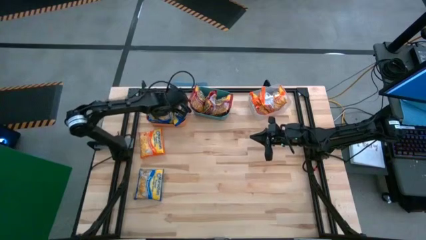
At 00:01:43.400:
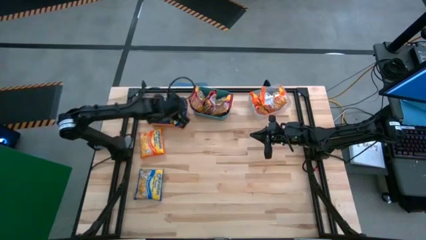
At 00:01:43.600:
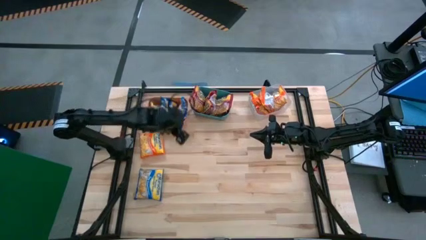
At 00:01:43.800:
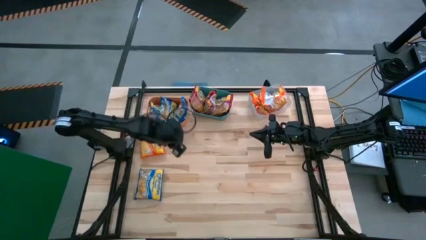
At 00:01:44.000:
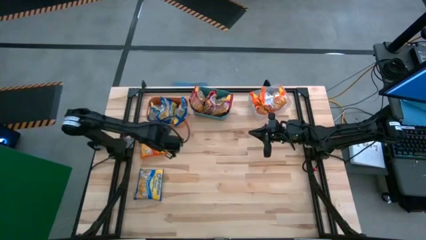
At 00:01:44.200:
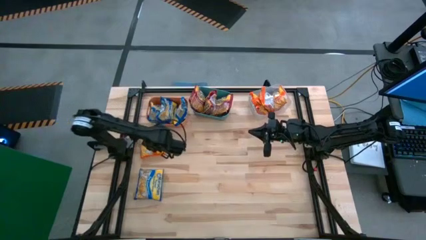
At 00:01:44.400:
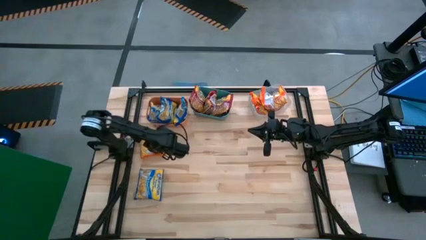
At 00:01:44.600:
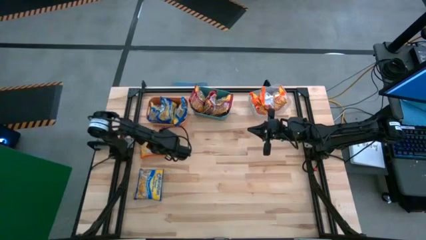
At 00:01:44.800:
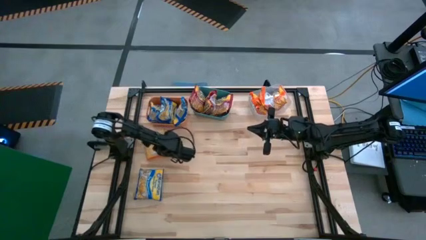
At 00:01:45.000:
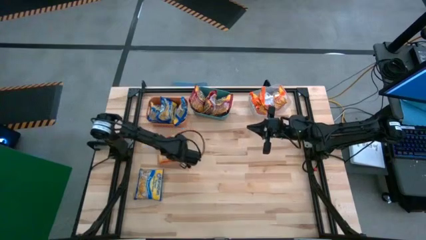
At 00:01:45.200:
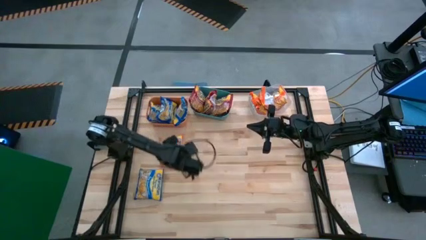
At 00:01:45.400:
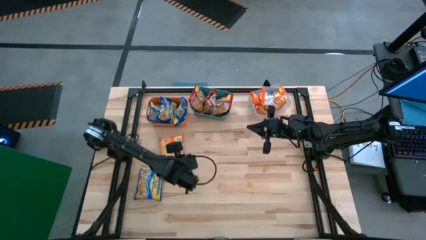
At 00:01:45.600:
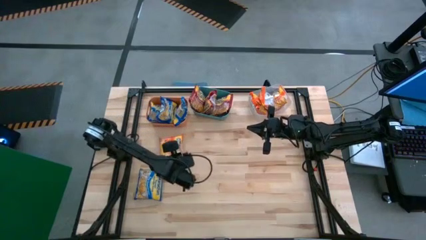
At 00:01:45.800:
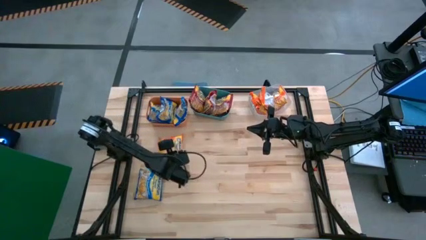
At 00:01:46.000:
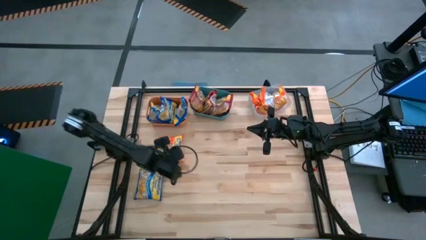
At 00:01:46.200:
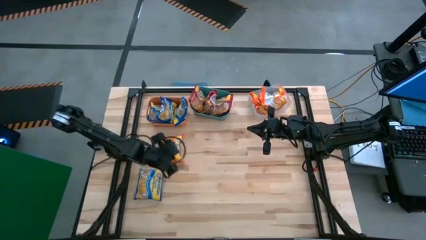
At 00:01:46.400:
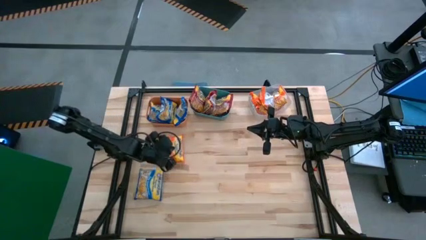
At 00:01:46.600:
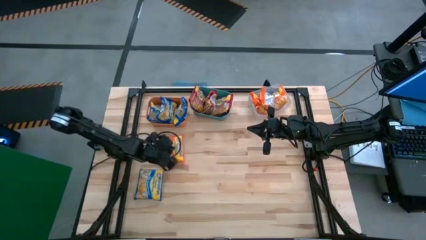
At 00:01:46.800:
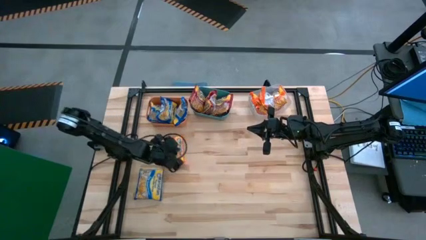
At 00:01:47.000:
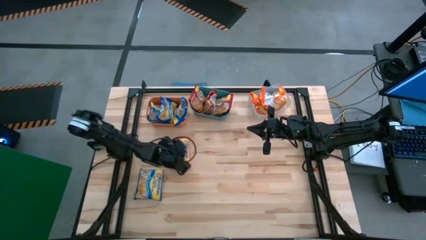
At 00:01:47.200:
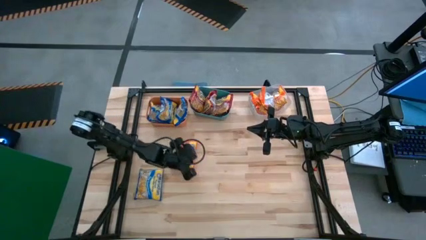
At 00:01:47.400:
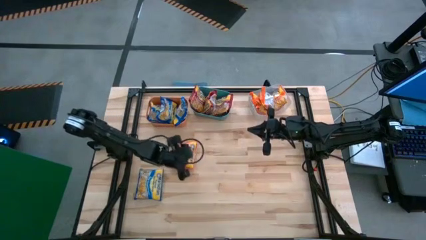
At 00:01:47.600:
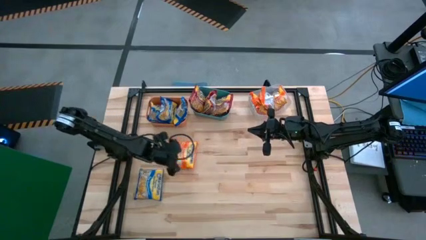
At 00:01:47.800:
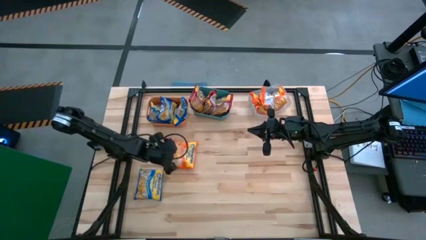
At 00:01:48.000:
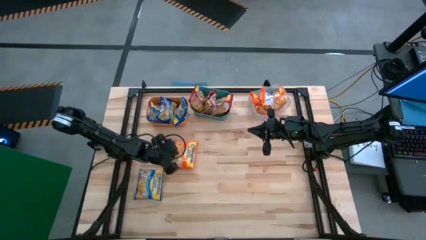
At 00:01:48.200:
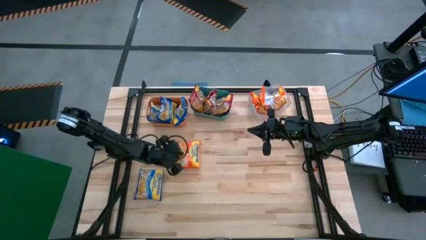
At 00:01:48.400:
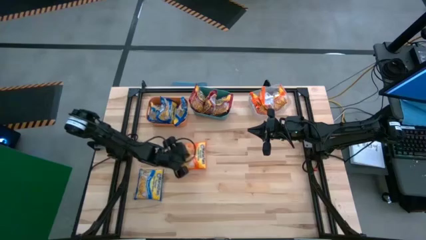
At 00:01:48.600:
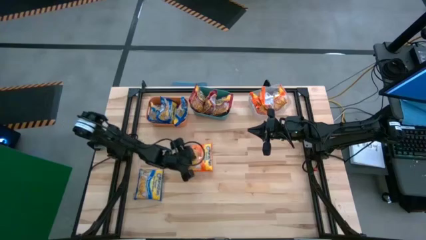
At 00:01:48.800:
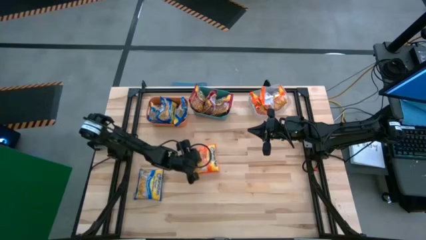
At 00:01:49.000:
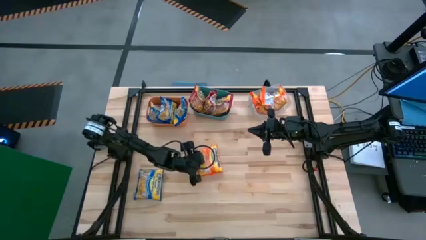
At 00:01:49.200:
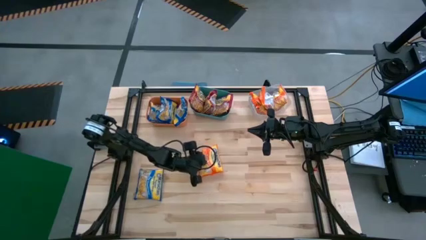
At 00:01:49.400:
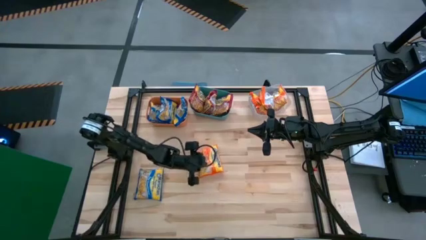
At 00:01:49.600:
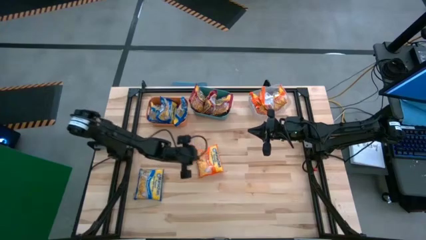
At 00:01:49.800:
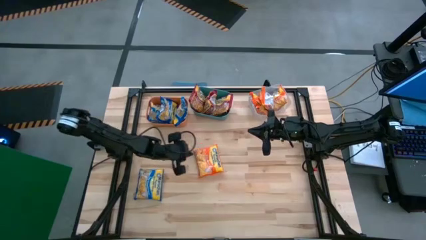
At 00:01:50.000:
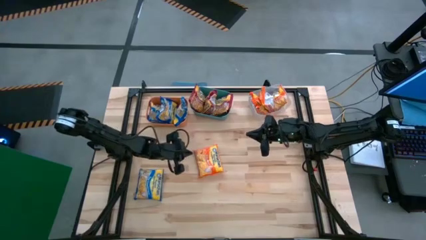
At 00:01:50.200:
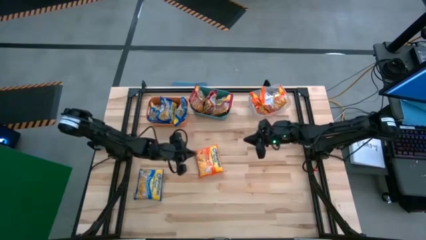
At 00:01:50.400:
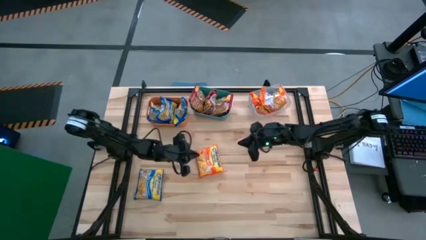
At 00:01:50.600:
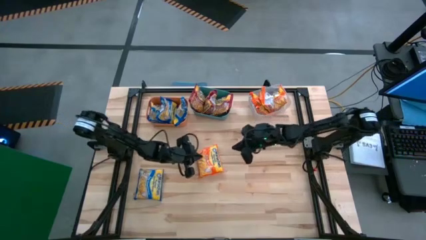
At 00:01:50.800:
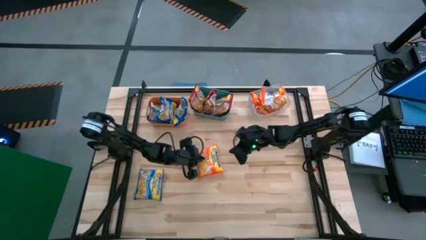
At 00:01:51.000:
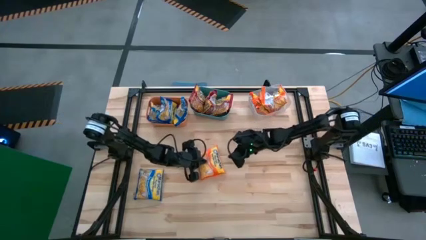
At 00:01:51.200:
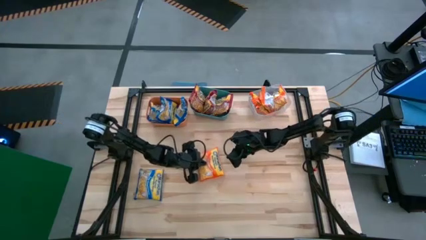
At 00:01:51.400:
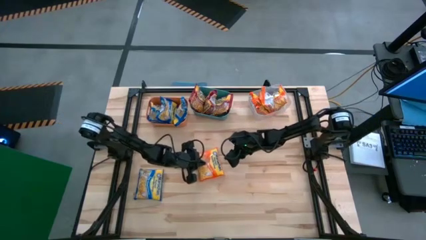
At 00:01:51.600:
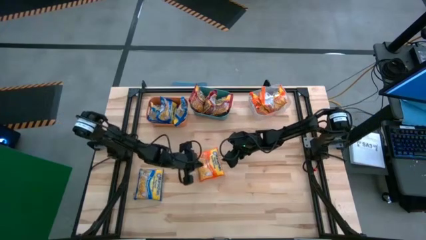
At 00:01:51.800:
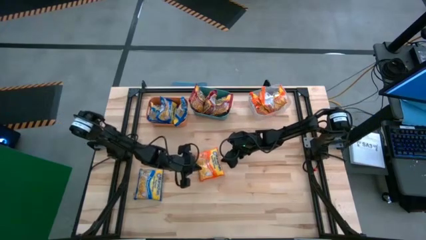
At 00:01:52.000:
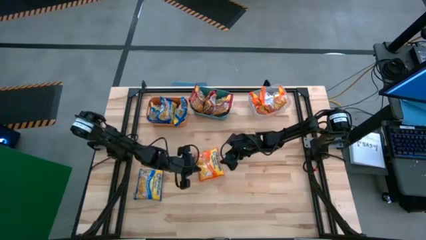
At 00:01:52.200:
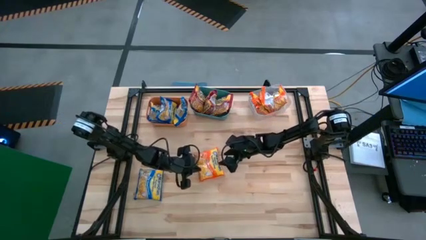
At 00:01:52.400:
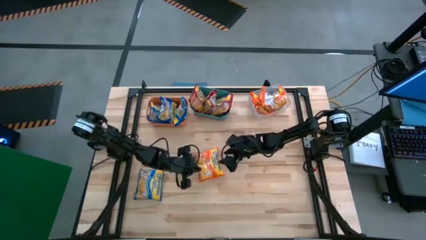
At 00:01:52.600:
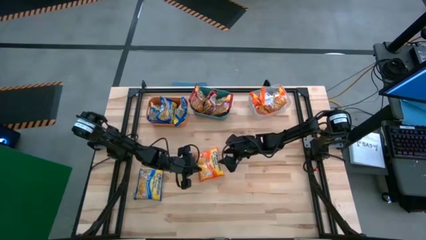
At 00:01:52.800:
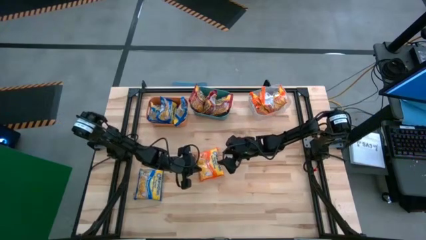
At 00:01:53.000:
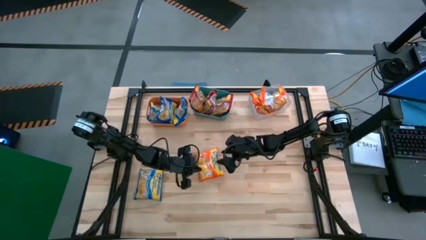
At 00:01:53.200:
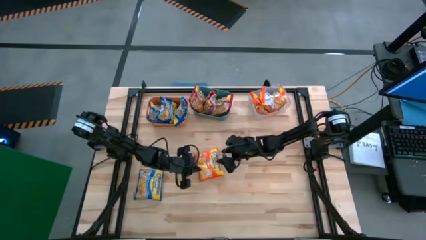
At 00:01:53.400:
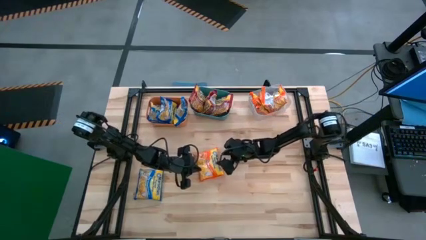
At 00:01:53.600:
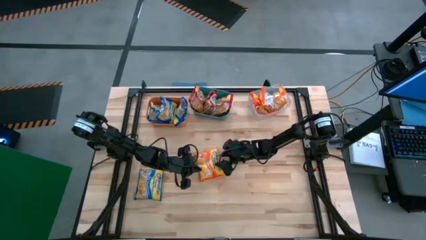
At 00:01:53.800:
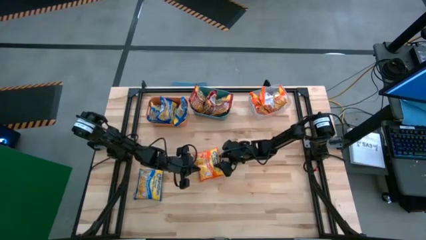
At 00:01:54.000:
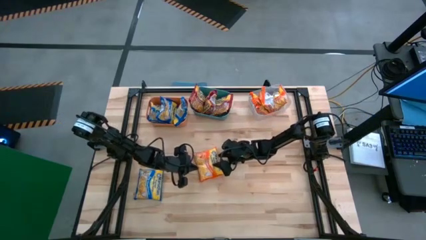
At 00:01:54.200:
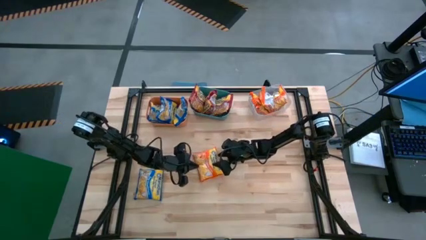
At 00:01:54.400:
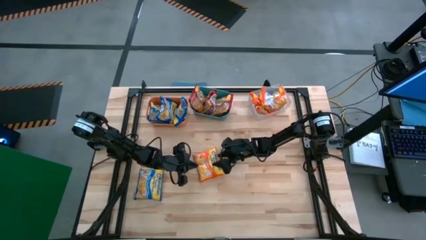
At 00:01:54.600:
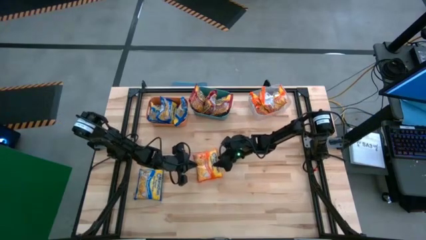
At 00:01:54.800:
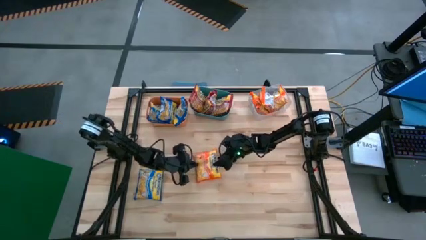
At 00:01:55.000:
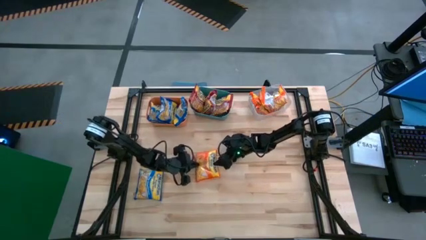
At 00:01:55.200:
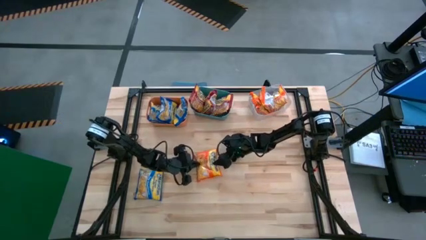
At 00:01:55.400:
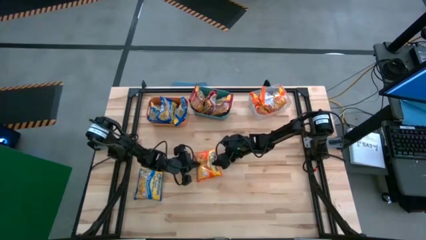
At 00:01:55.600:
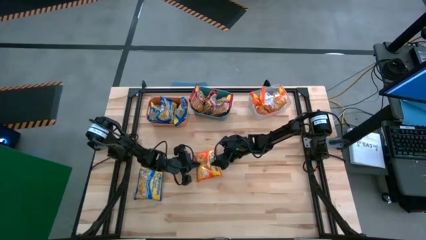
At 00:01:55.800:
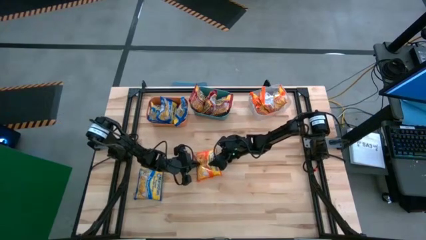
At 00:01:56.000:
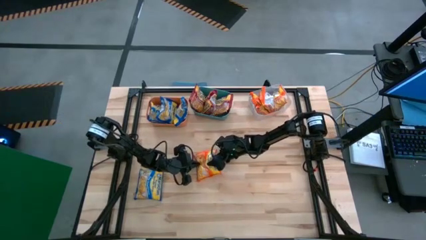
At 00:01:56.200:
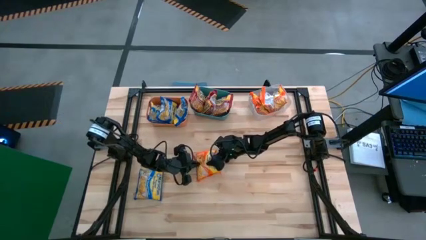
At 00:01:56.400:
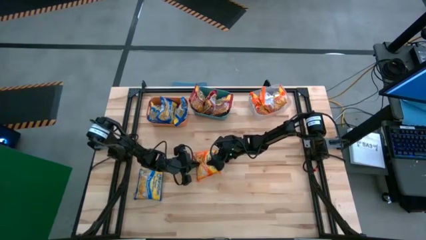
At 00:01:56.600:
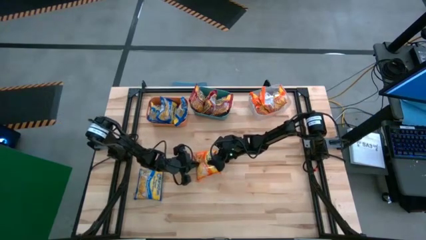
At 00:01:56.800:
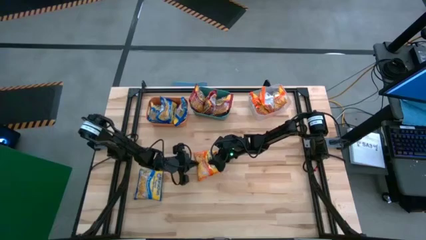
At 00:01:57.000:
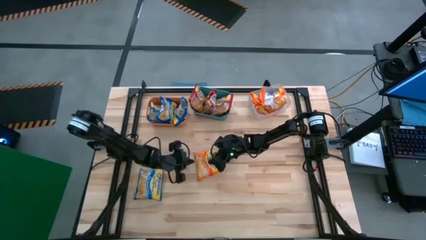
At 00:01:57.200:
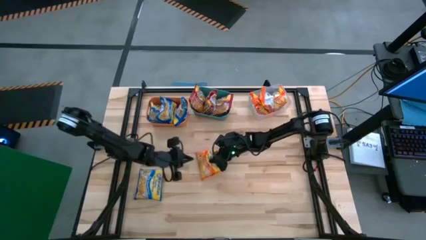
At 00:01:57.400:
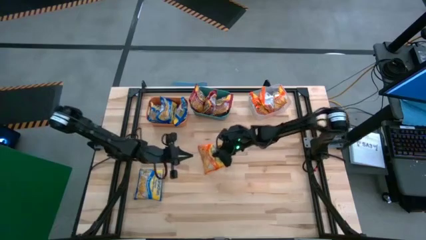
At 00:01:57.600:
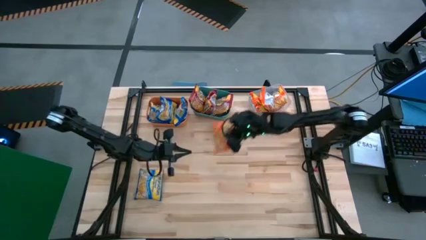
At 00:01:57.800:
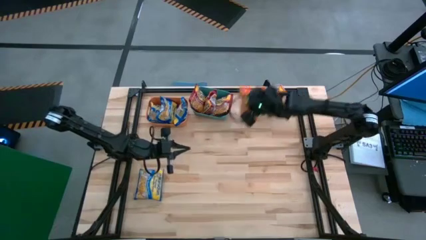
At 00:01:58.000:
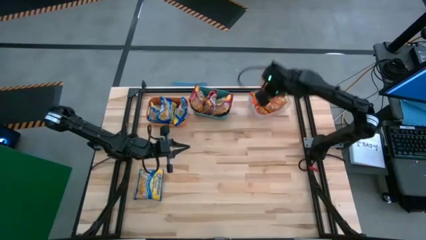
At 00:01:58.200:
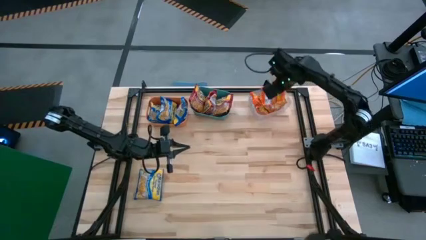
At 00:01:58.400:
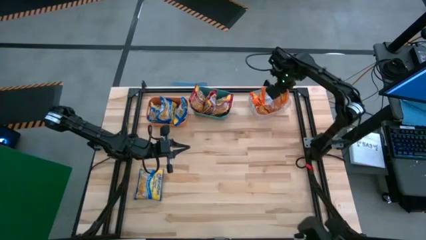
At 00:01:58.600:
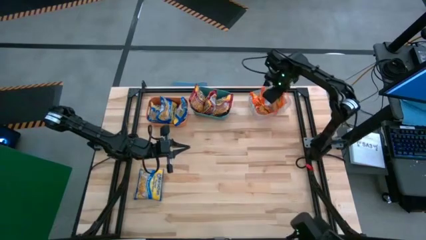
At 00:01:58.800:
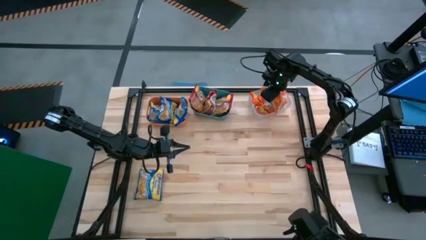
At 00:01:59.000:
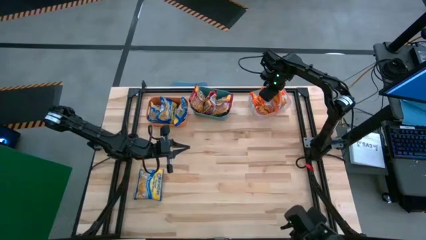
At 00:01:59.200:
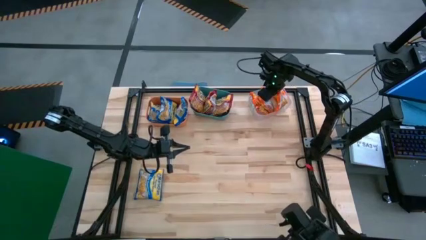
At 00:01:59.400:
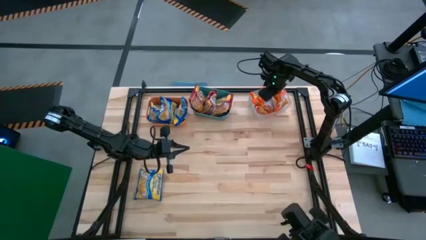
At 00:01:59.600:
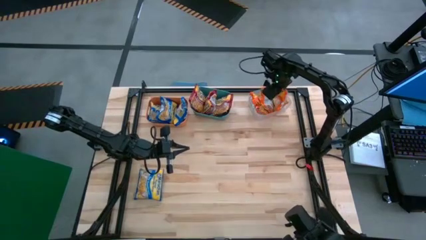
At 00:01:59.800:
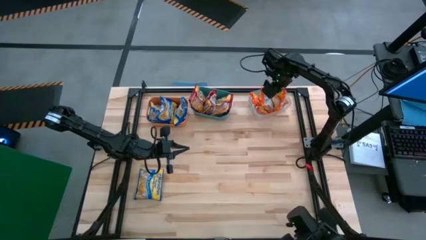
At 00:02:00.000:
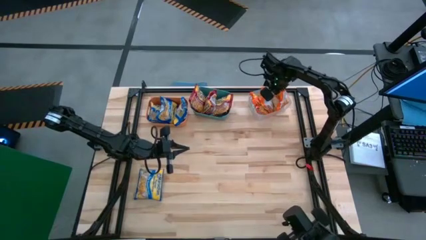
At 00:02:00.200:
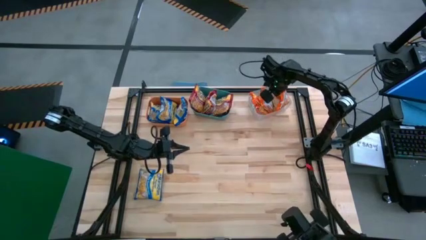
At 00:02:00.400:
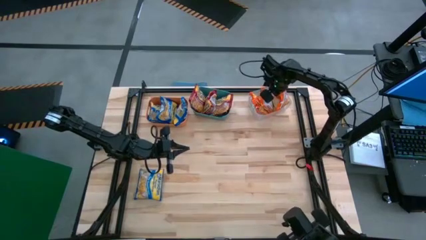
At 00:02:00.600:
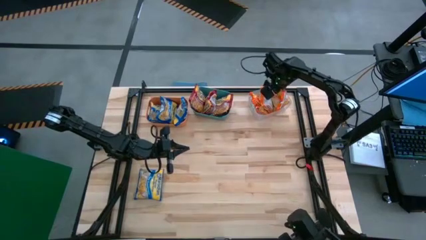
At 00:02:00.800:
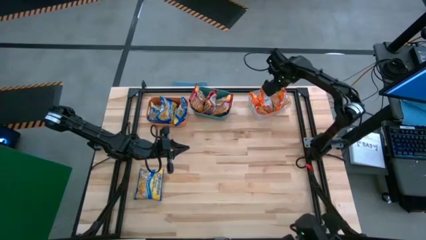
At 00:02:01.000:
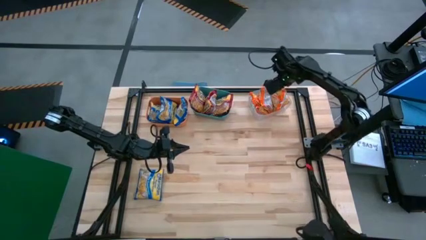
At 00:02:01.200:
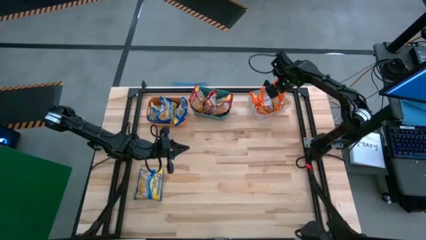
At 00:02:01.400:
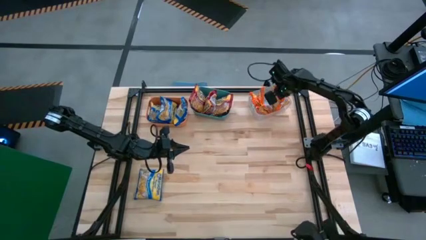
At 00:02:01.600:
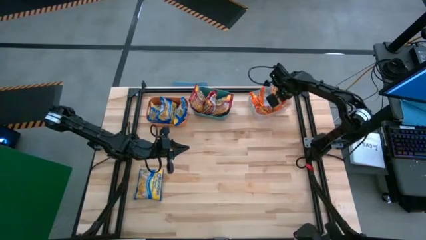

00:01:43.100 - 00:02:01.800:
Task: Sort Maruchan noodles
Put the orange noodle pack into the transparent bin
